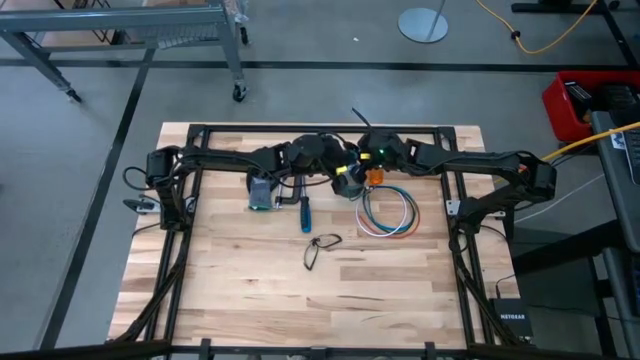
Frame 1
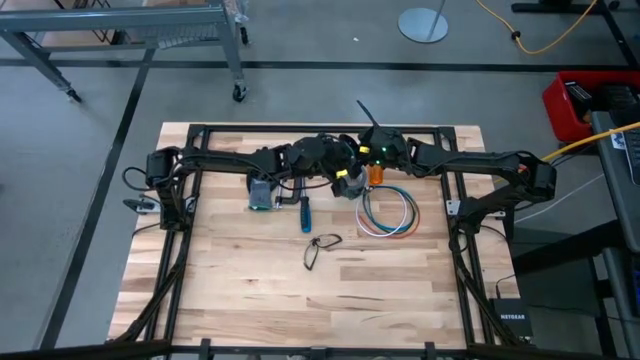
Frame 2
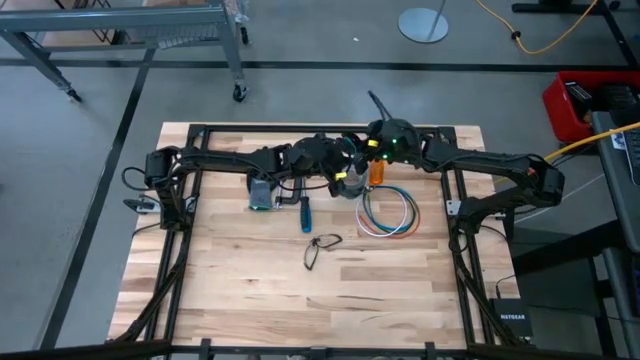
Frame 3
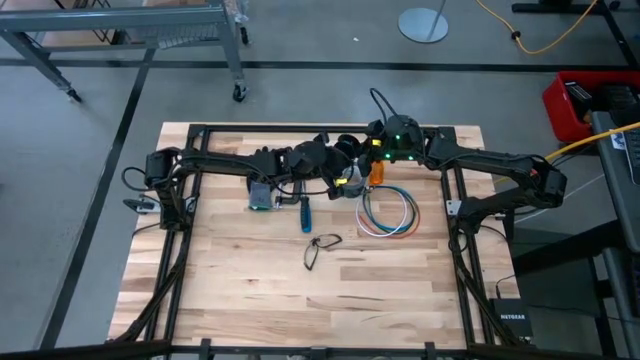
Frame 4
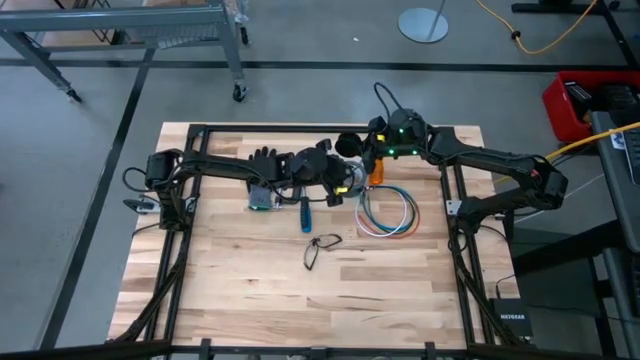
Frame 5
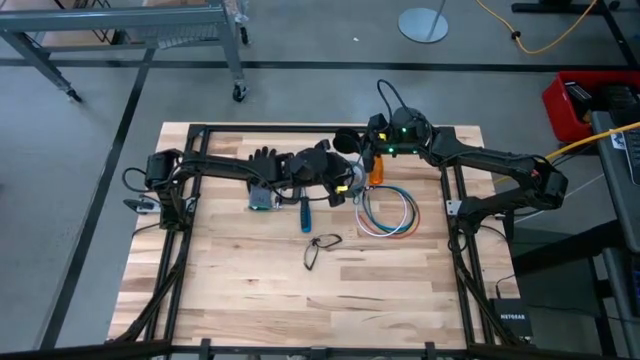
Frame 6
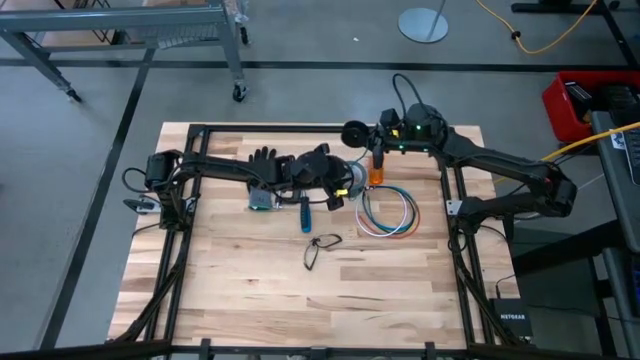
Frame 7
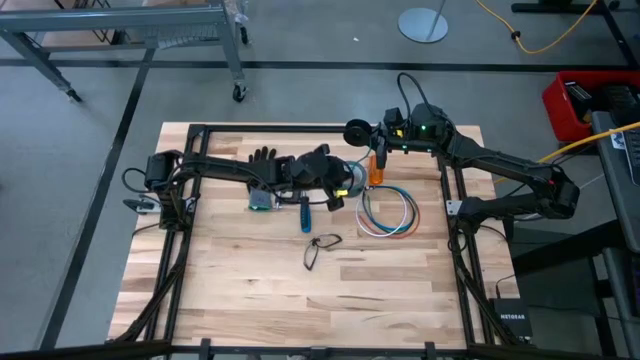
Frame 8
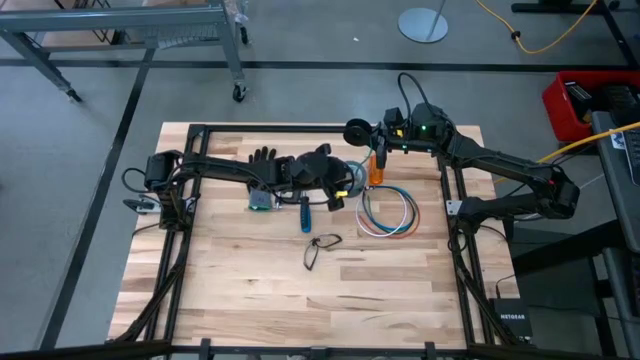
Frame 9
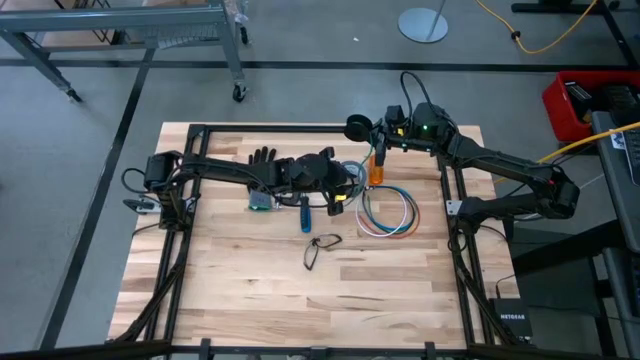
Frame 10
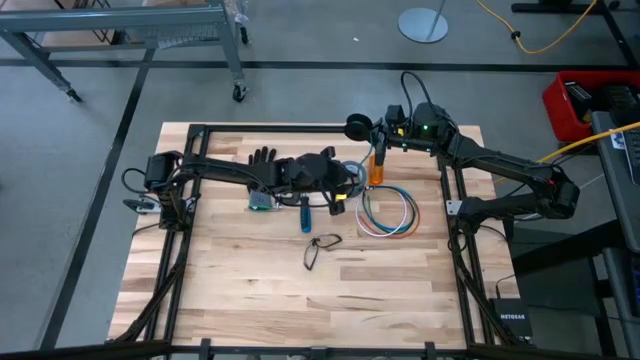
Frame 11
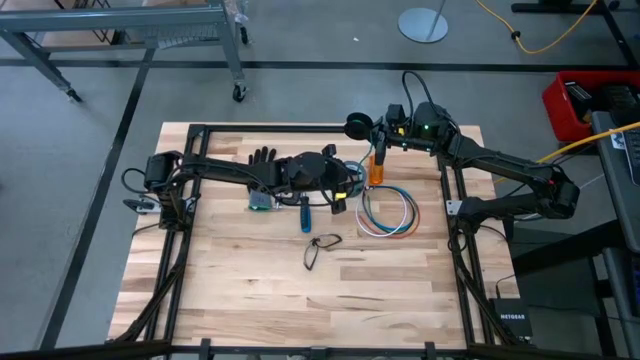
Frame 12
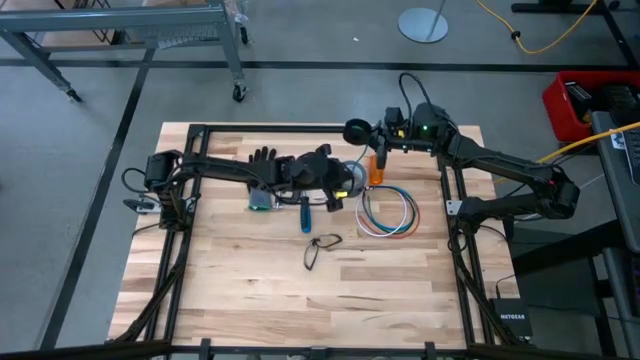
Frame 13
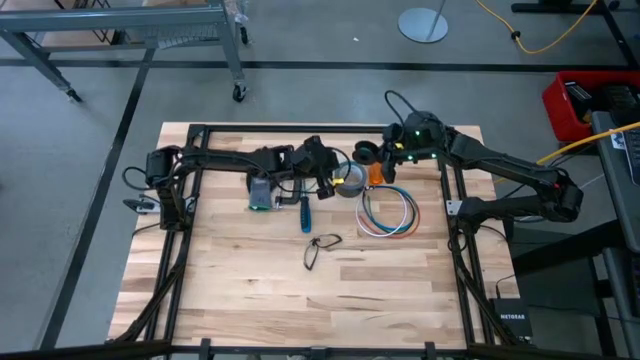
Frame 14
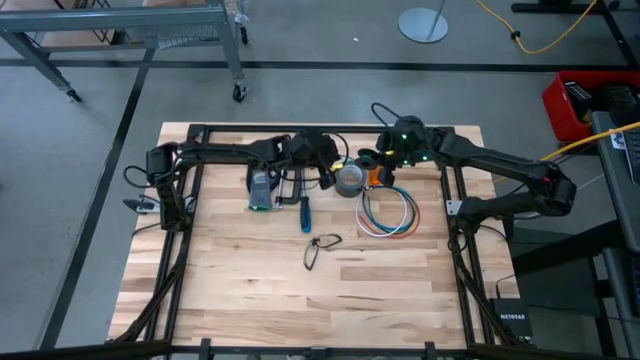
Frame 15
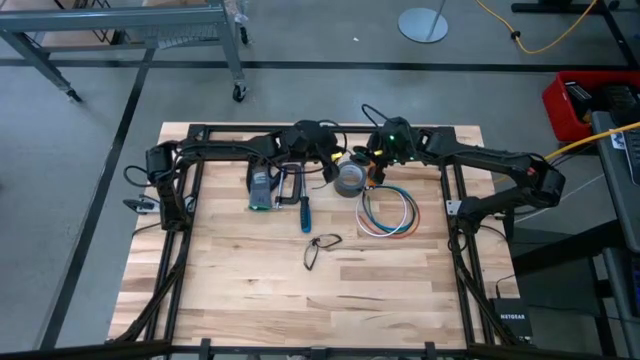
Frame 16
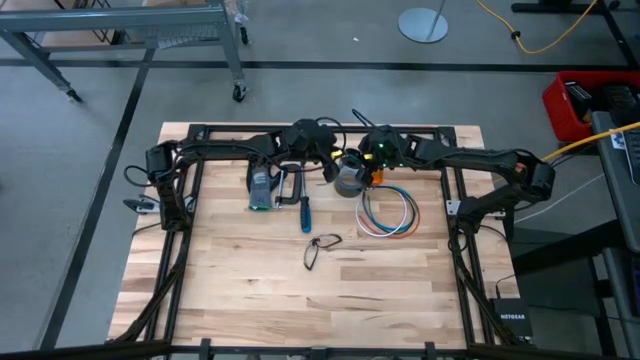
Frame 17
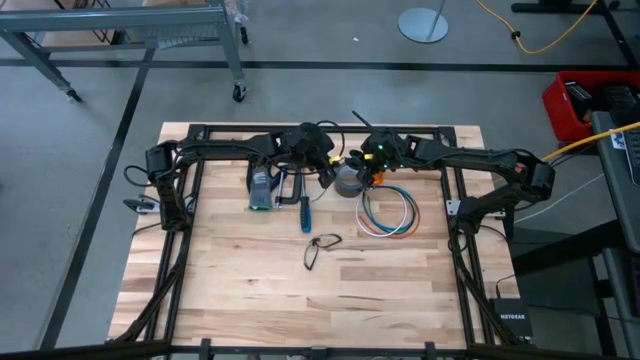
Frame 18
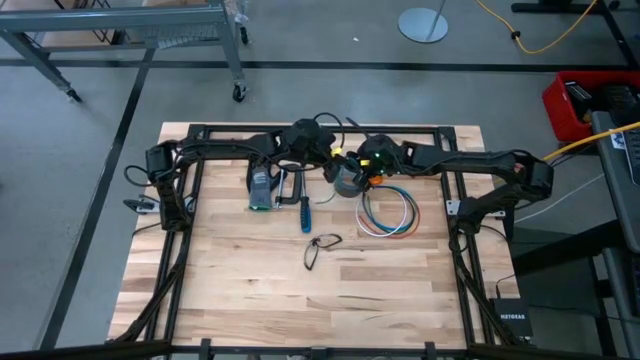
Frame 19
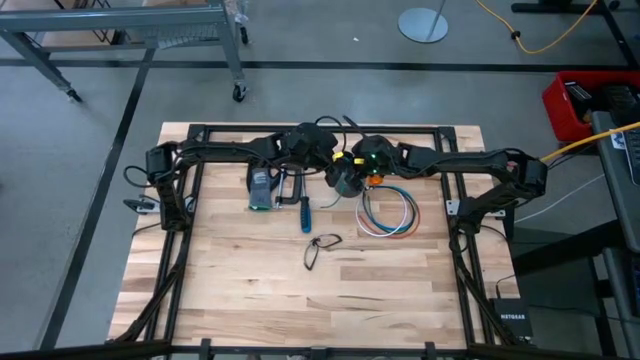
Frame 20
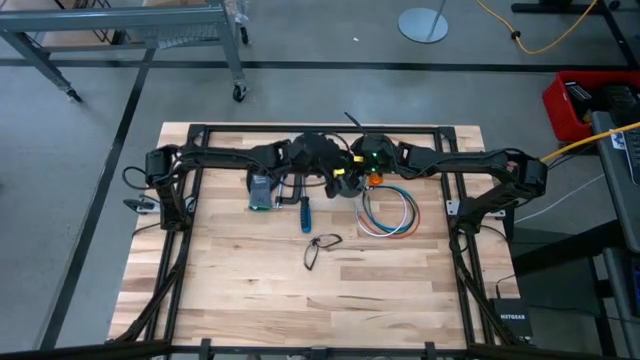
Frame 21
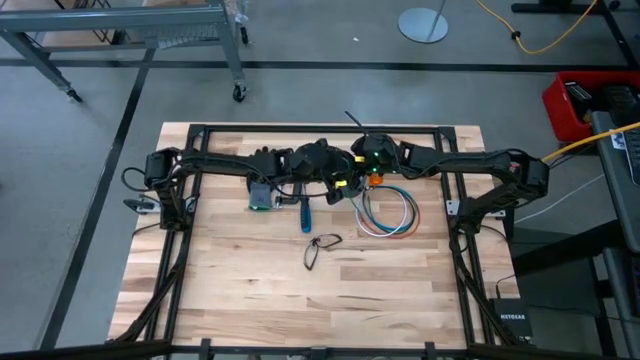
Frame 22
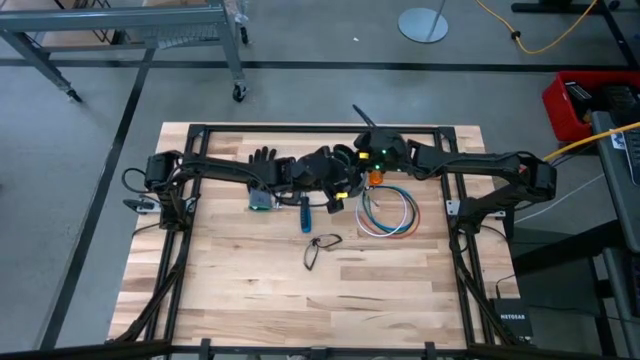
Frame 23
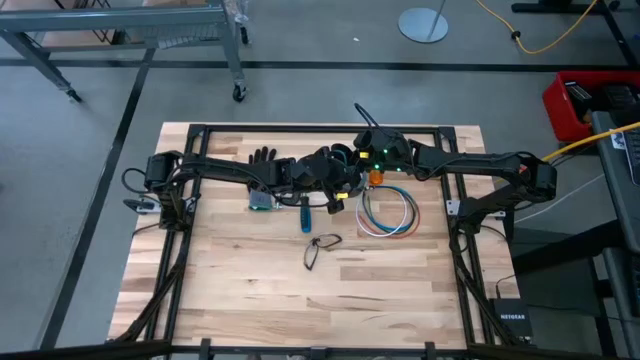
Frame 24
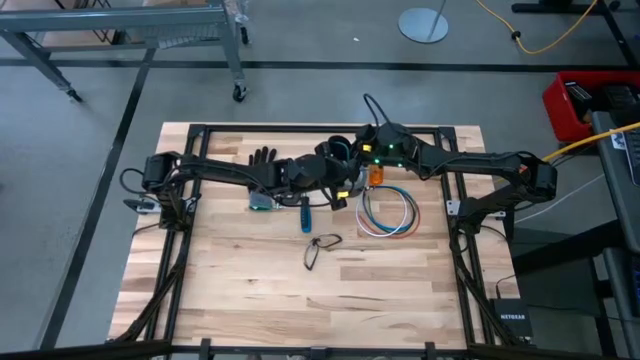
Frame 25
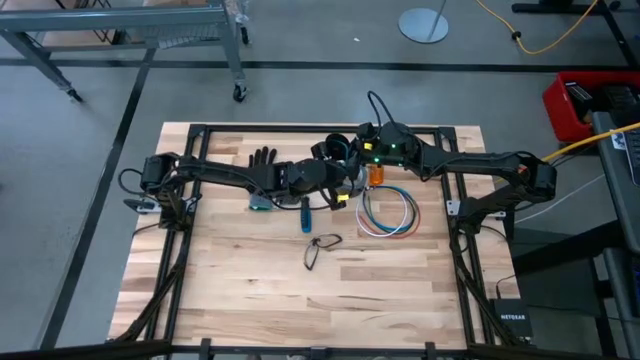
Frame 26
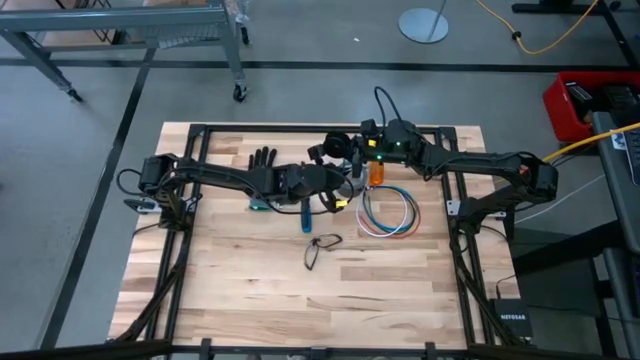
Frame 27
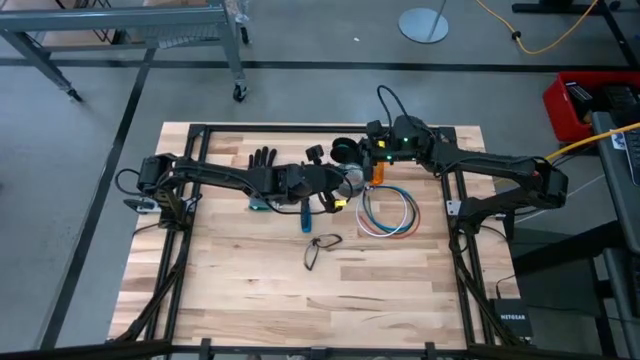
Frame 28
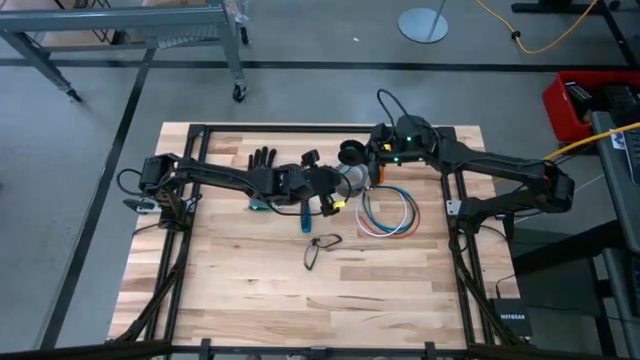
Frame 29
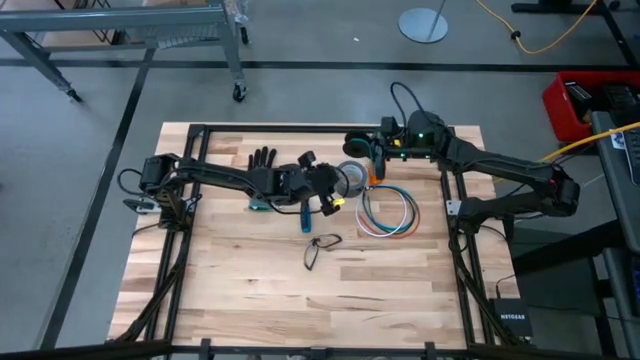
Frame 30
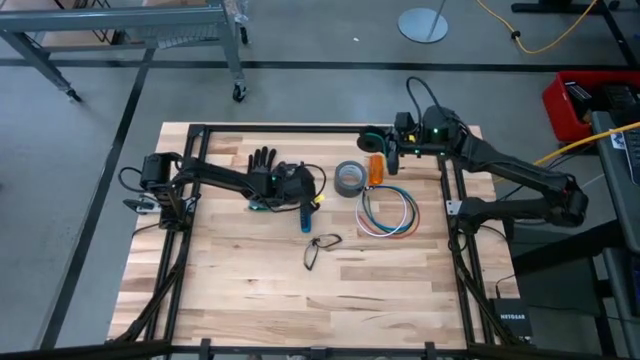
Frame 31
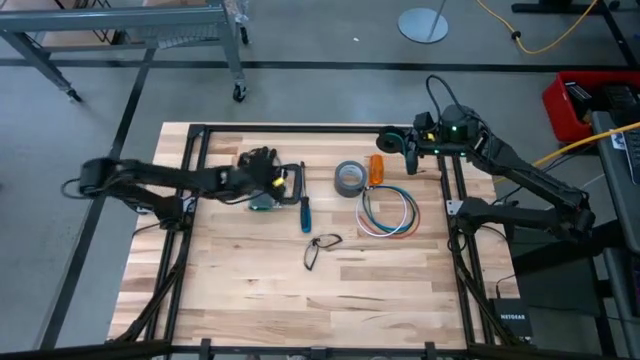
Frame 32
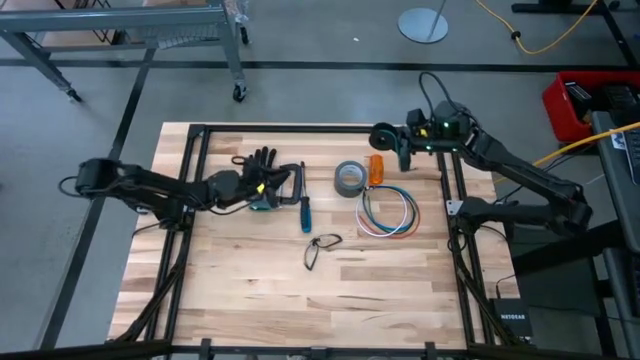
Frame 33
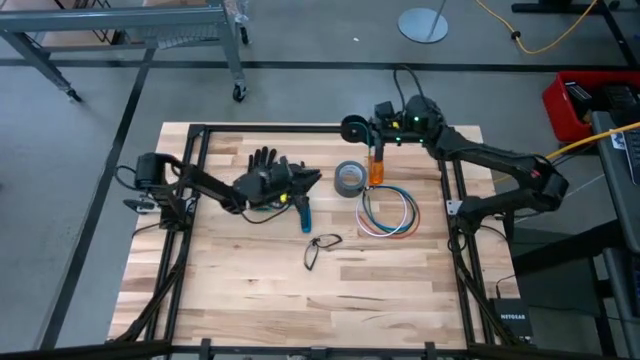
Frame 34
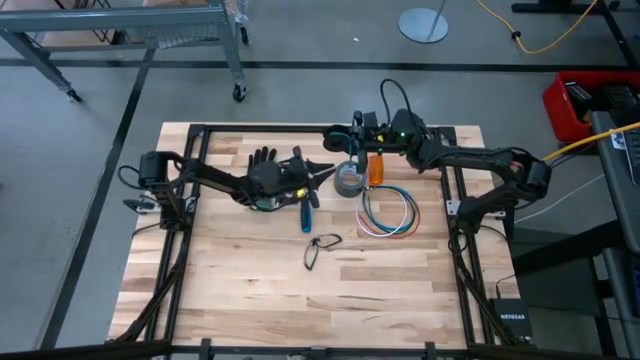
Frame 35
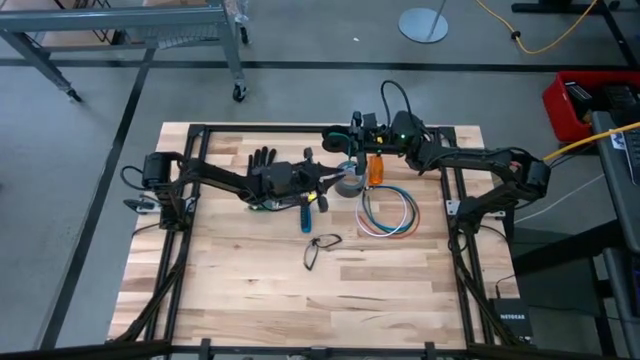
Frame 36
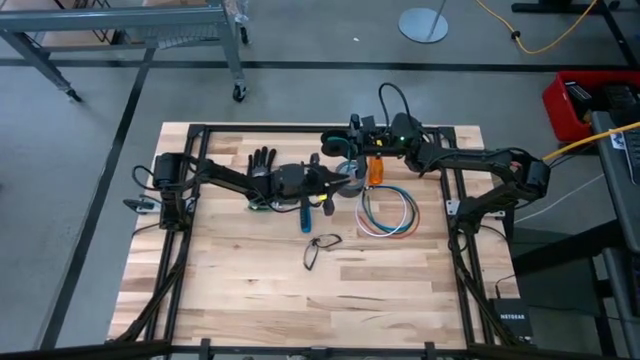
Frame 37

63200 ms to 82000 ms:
Task: Coil cords
Coil the green wire onto the spool
